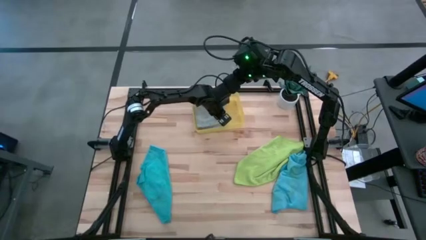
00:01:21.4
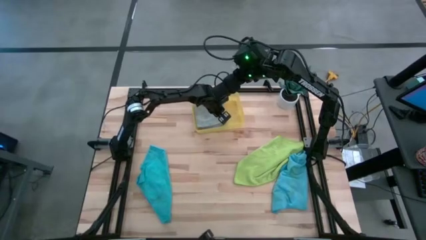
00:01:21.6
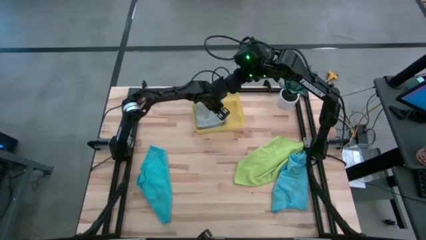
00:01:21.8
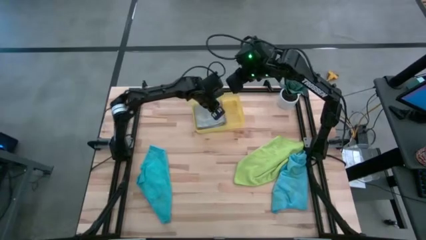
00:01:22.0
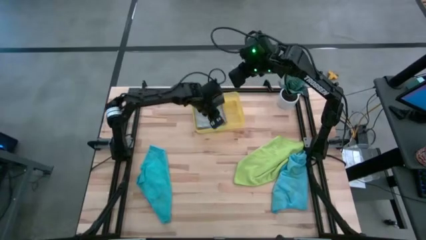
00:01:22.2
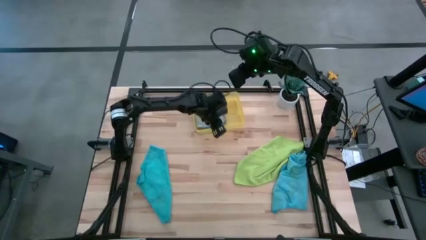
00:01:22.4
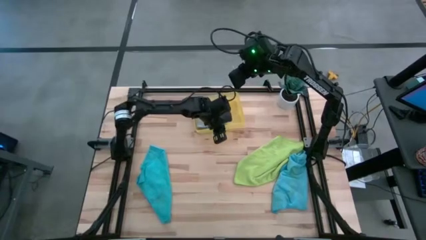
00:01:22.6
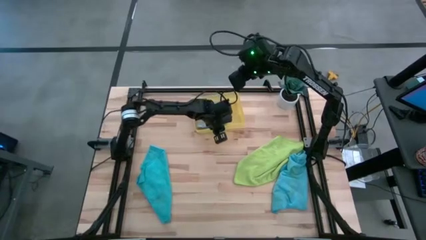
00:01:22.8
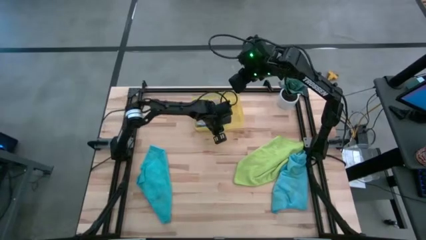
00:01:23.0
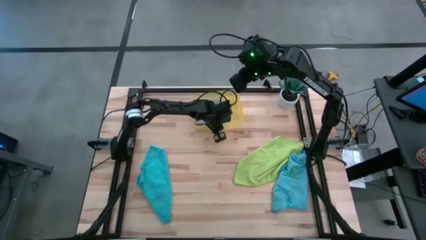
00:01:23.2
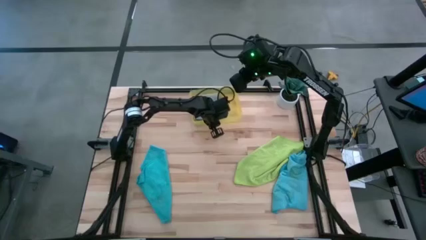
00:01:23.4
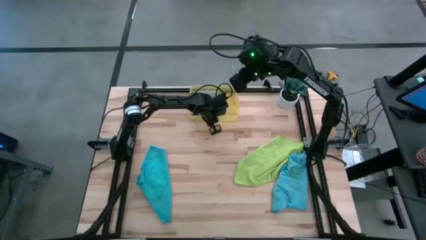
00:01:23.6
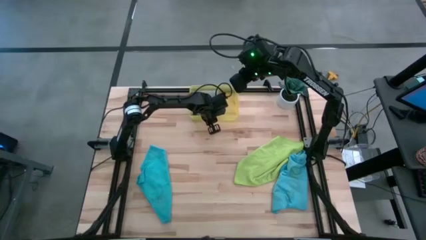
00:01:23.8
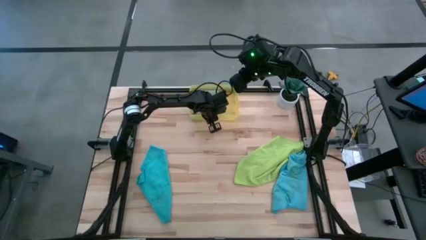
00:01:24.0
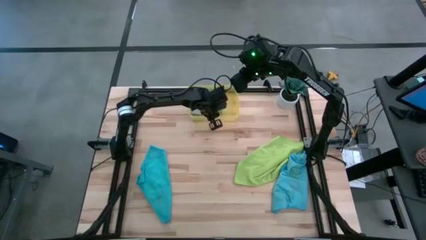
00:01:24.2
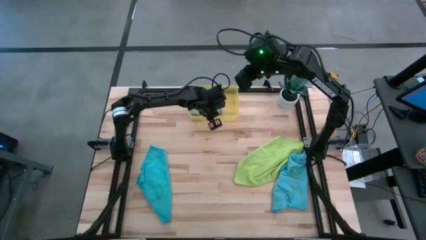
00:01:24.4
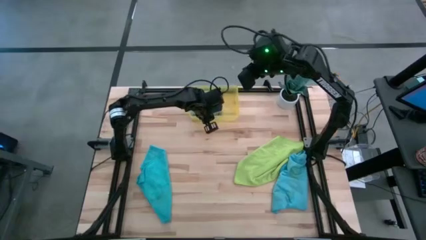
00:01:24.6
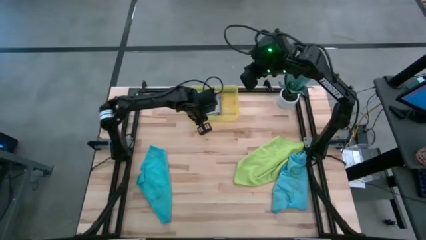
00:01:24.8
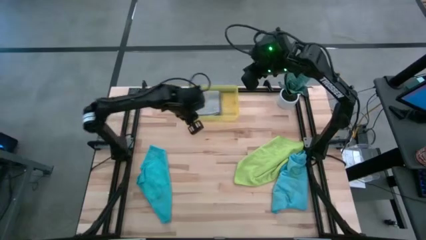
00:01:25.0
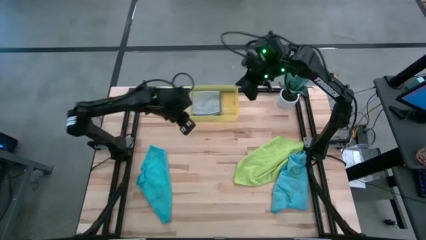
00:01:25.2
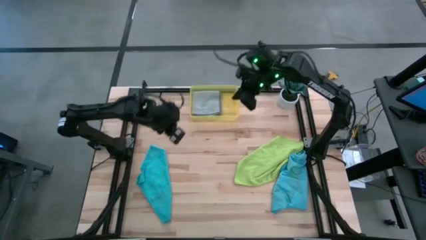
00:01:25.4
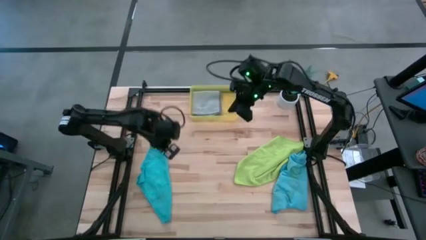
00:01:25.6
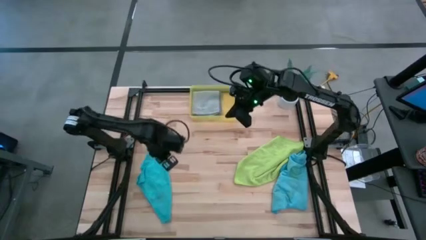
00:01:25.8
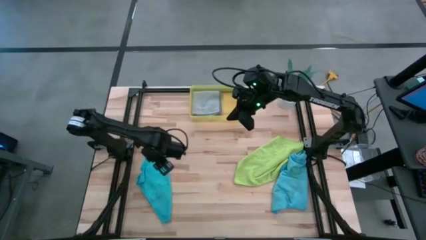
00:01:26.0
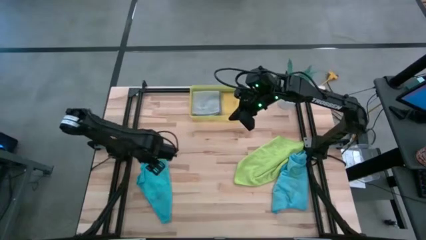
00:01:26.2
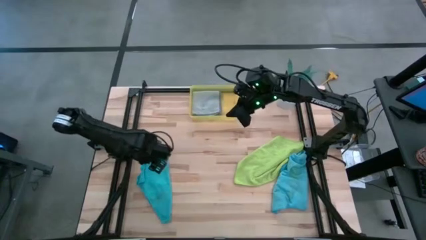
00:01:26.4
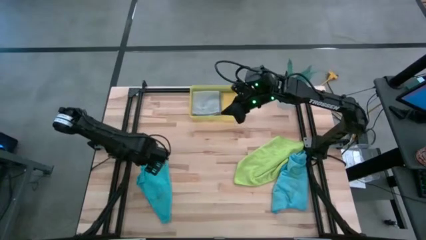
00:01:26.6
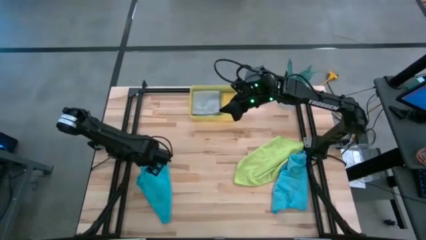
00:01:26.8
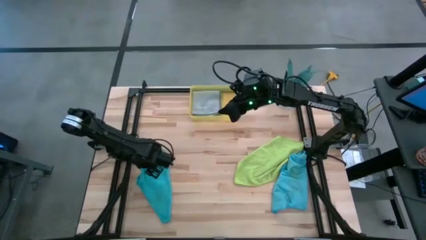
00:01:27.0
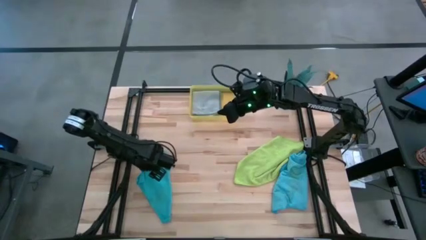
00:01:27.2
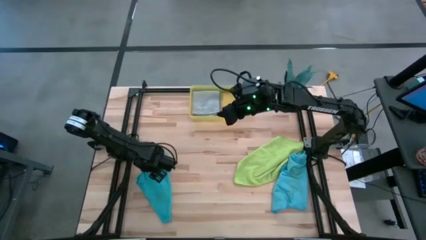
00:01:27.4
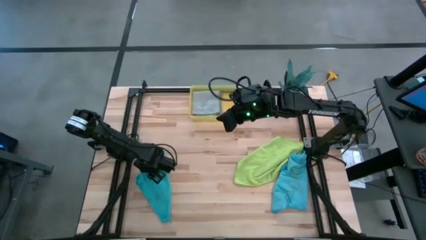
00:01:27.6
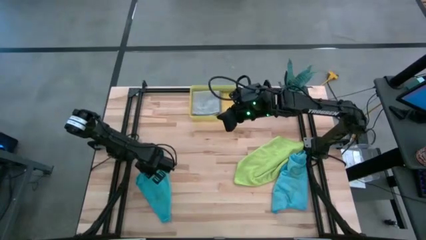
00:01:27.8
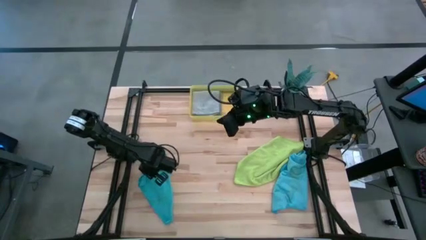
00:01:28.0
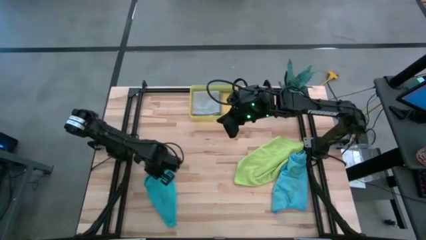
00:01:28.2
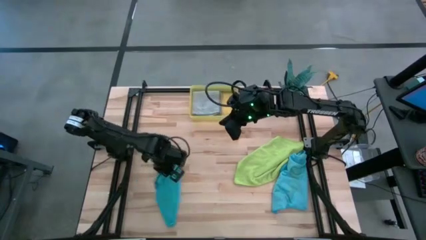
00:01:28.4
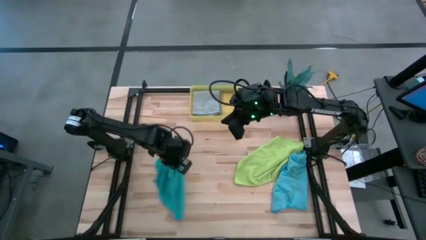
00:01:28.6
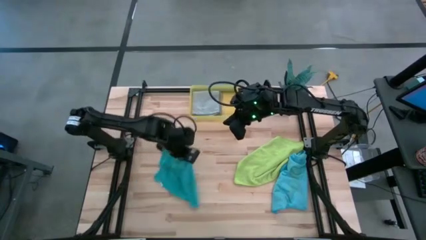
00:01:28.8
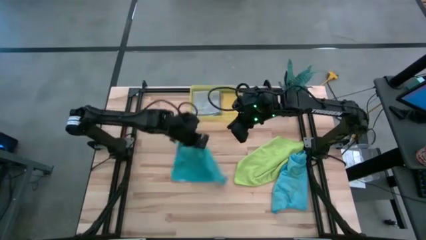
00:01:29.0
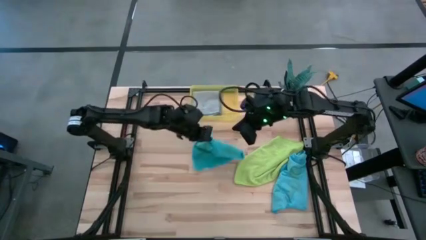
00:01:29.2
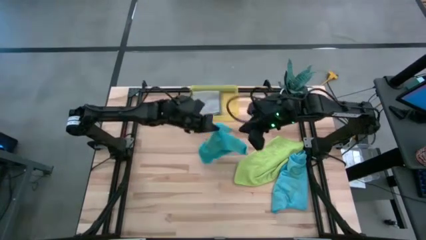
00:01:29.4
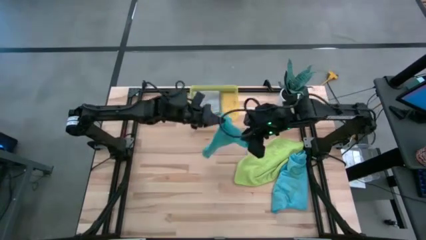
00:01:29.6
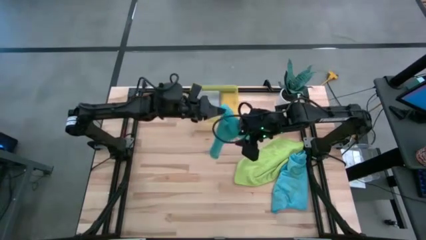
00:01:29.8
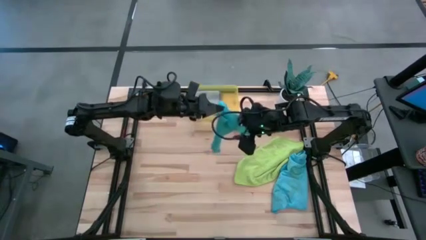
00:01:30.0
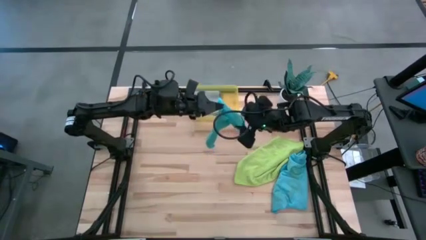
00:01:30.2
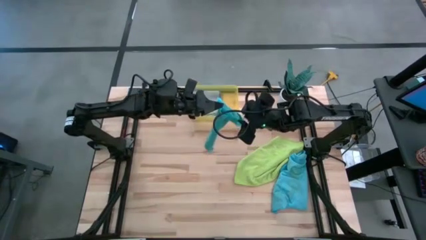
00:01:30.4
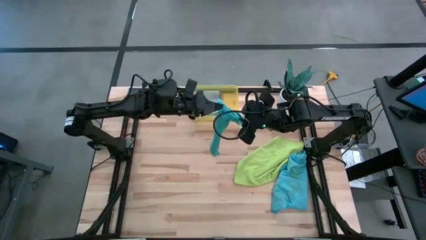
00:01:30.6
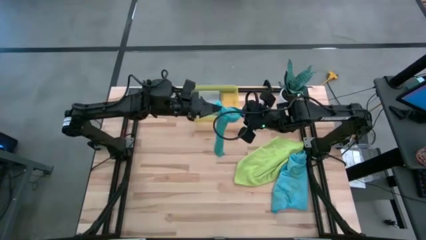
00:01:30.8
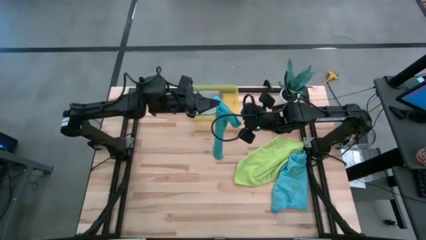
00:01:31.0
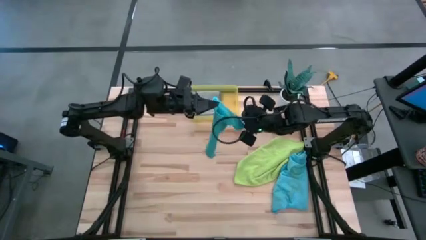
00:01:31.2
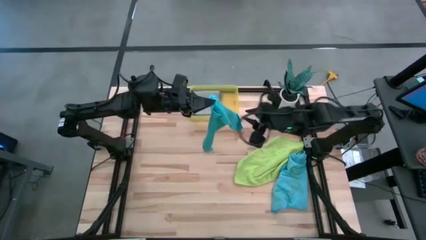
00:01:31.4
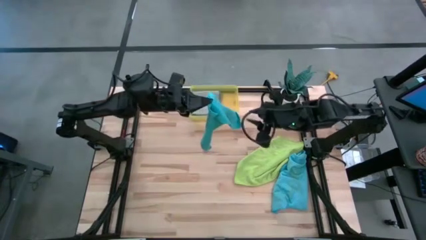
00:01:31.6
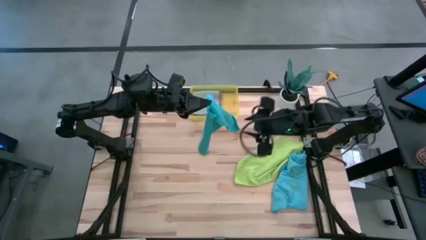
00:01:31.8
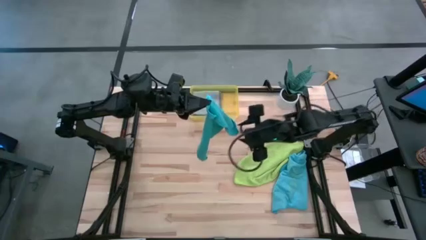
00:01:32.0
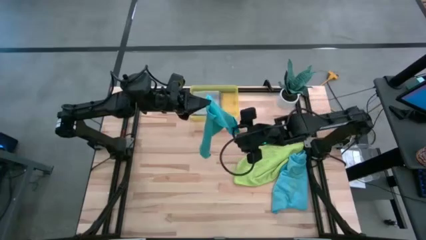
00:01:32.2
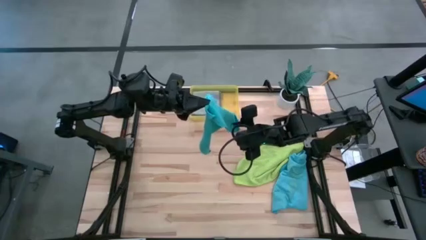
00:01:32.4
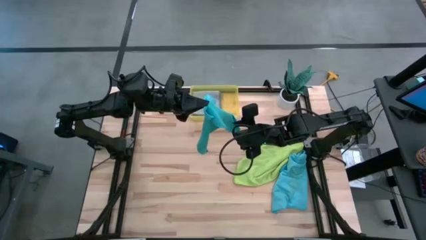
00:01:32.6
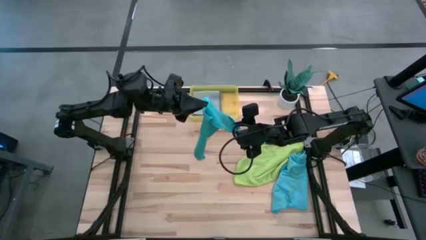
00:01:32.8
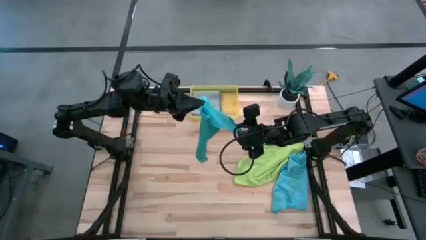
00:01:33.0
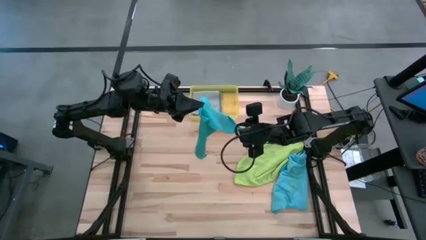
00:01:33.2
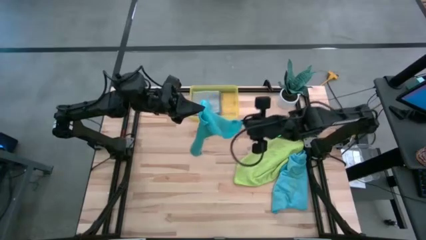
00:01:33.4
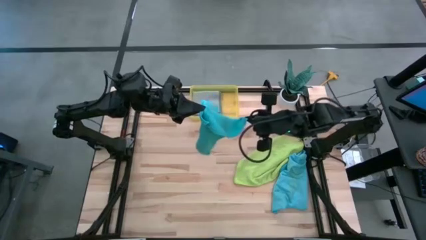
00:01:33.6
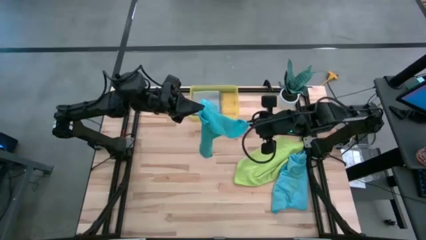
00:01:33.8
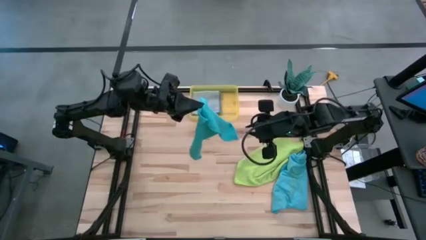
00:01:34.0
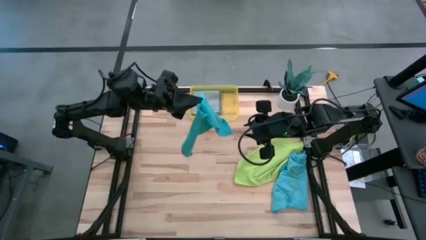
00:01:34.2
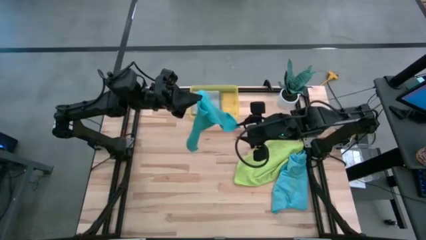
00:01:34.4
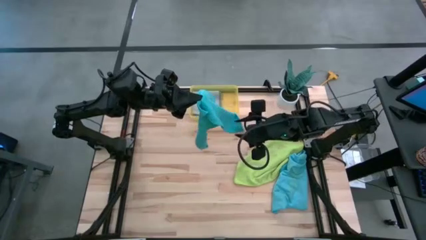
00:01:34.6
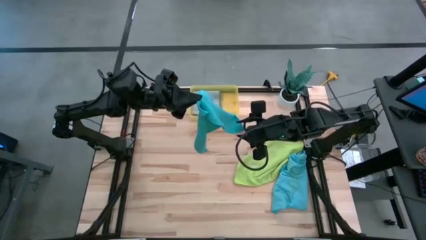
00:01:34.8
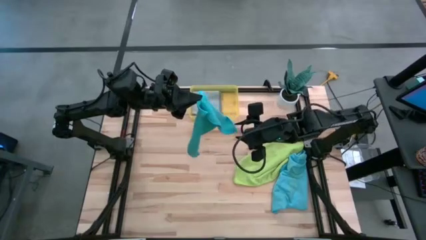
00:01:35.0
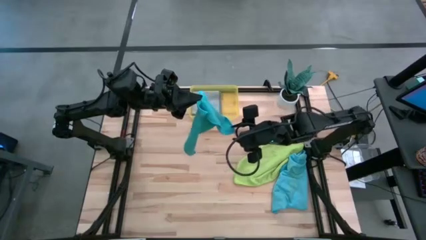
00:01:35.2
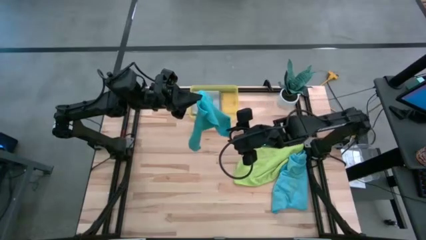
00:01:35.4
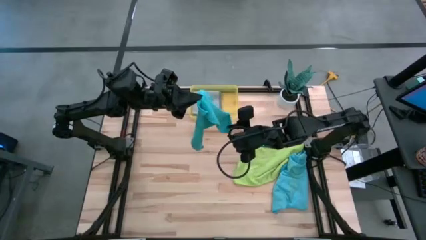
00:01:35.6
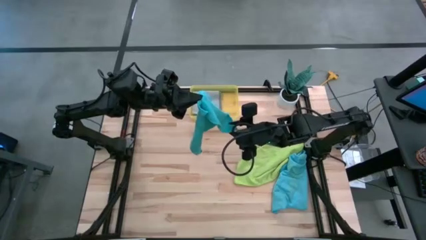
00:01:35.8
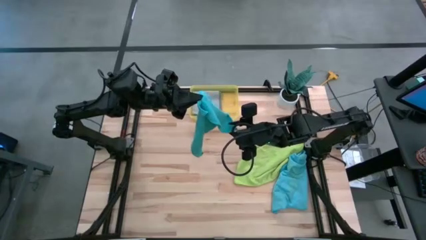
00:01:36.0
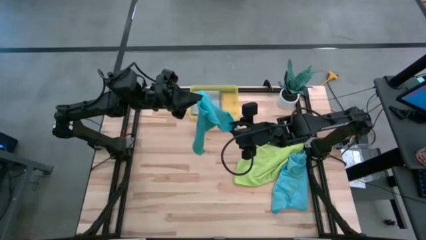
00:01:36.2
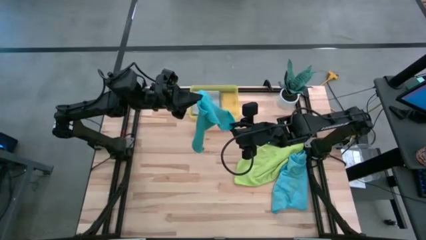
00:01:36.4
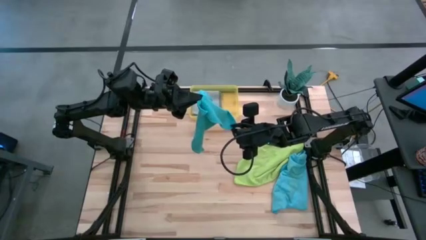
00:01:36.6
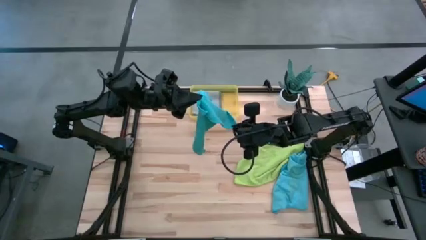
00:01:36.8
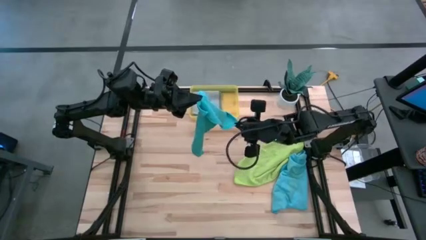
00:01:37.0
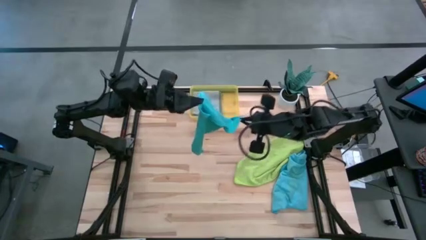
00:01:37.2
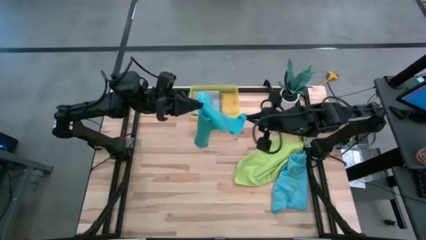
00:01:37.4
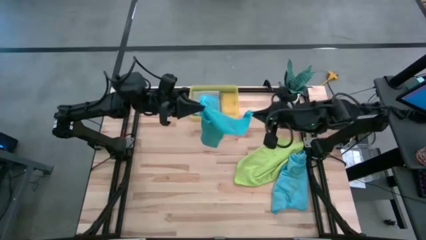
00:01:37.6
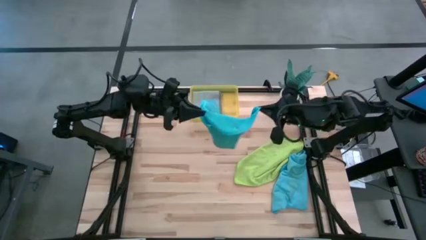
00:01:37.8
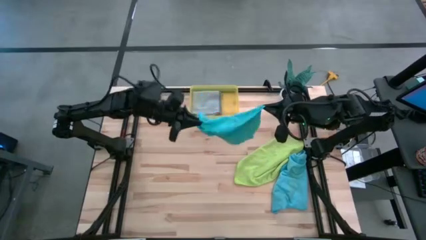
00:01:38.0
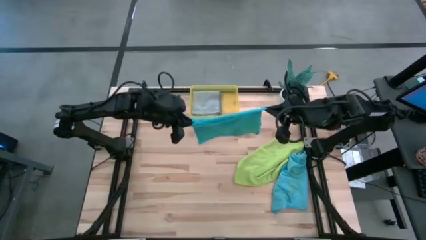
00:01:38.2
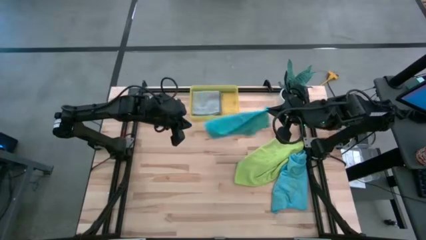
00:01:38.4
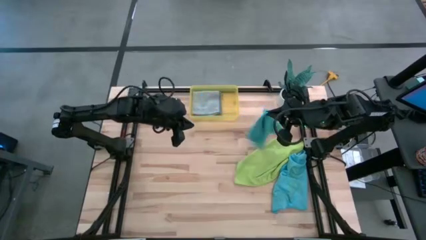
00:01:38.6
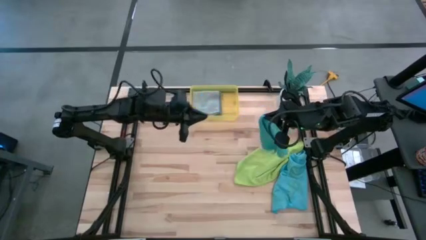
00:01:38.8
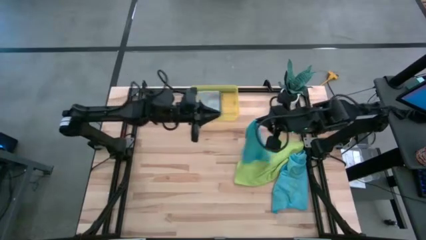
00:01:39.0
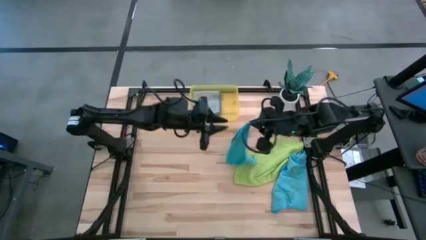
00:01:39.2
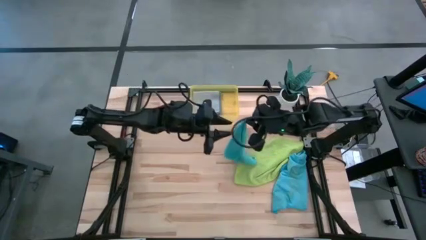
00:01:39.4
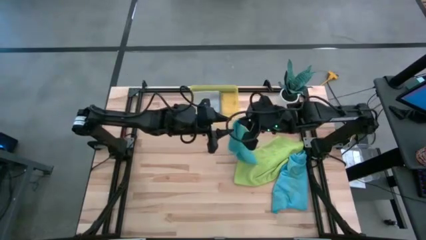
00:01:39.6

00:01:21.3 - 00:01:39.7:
Task: Fold microfiber towels
Fold the blue microfiber cloth
